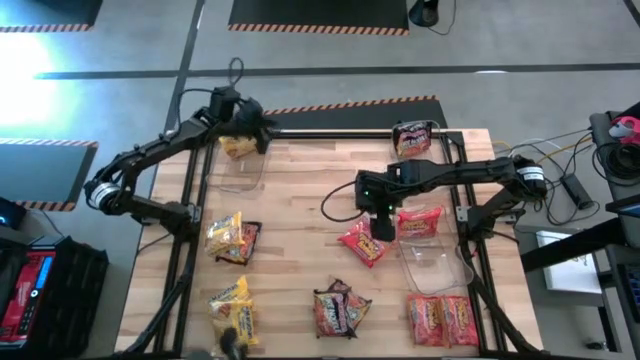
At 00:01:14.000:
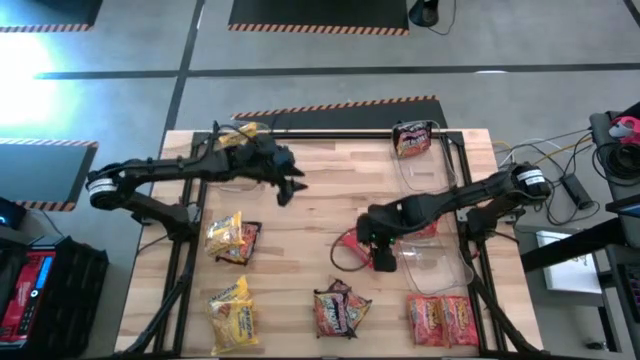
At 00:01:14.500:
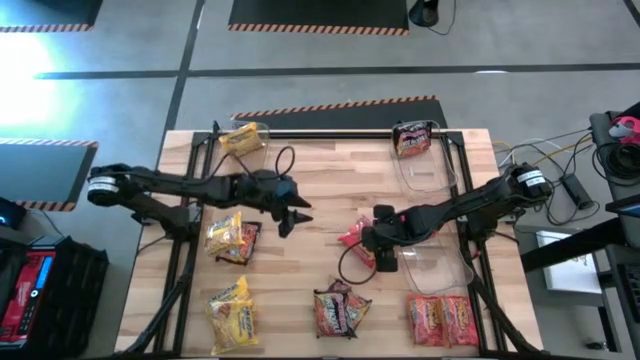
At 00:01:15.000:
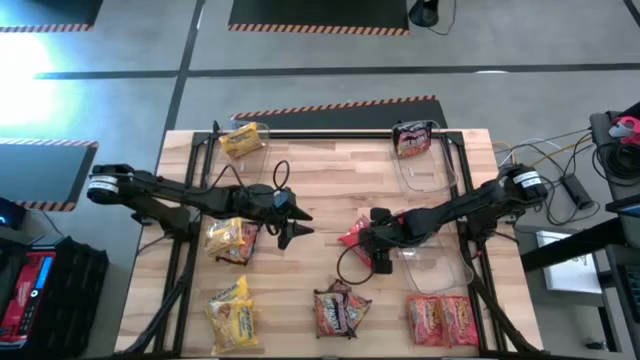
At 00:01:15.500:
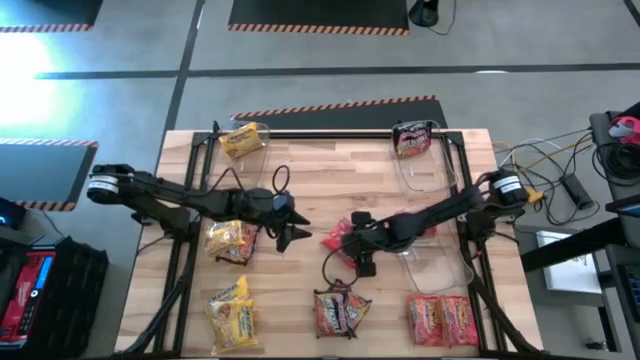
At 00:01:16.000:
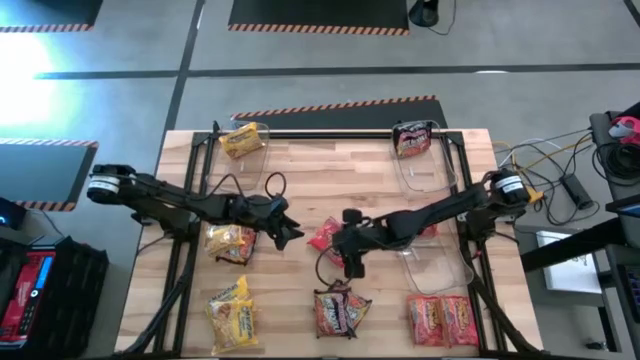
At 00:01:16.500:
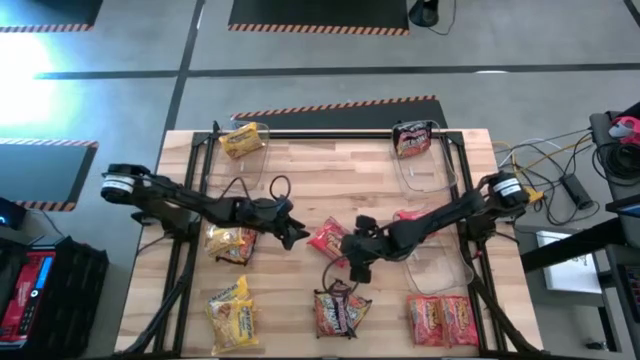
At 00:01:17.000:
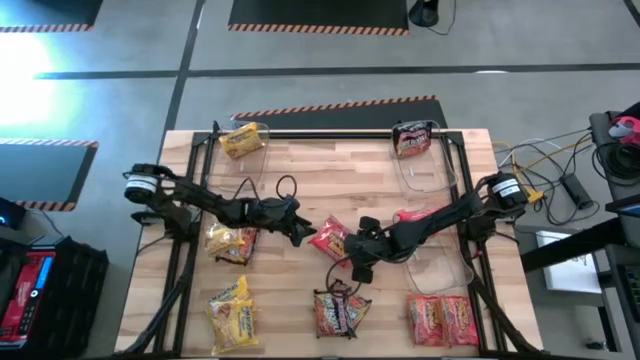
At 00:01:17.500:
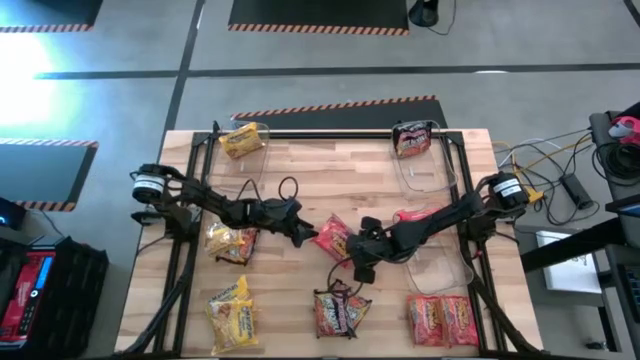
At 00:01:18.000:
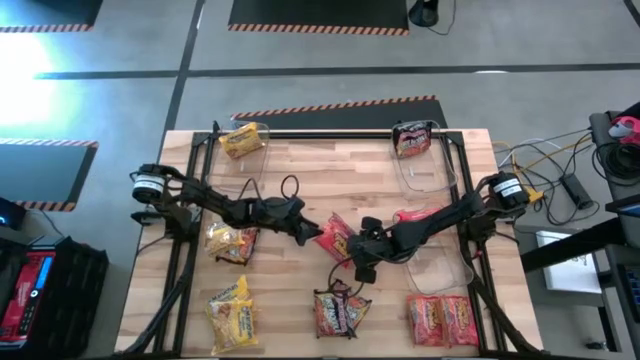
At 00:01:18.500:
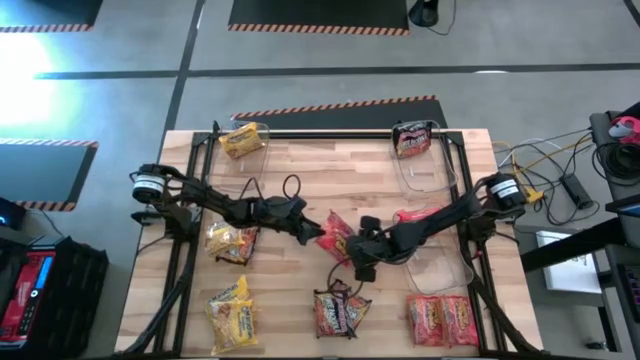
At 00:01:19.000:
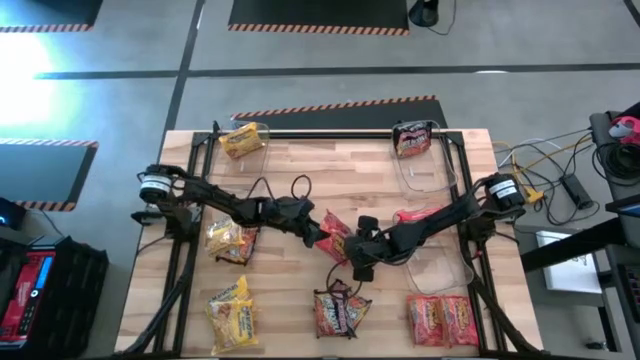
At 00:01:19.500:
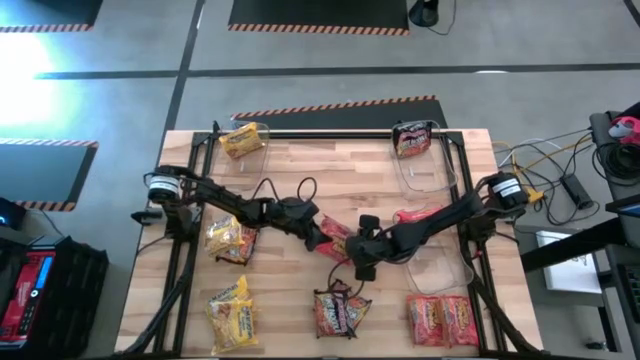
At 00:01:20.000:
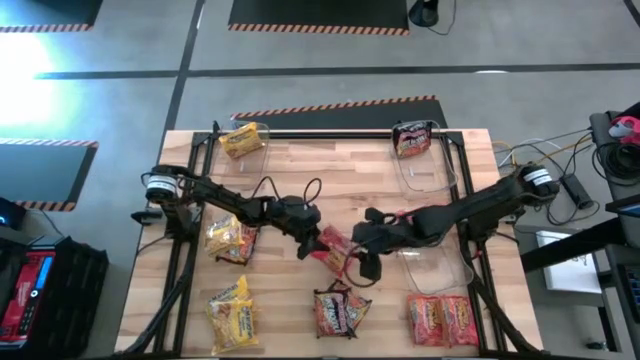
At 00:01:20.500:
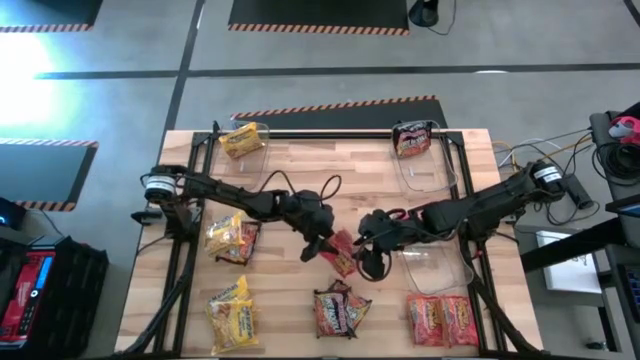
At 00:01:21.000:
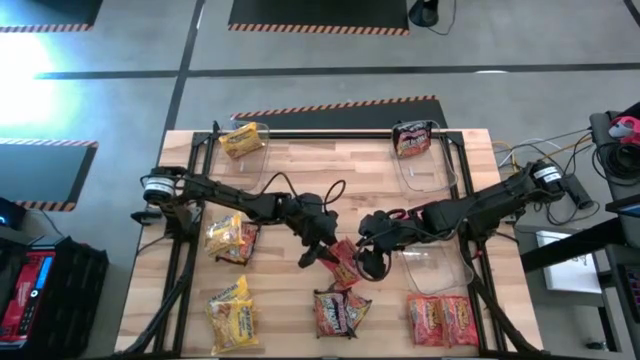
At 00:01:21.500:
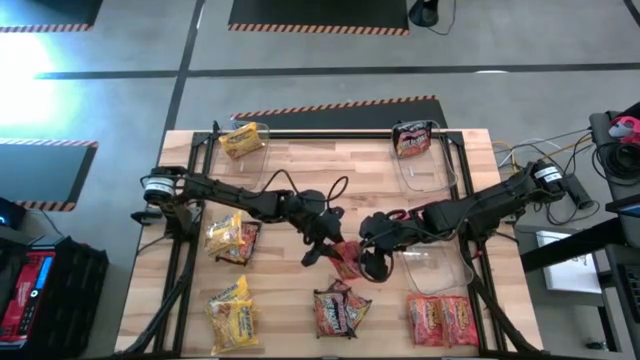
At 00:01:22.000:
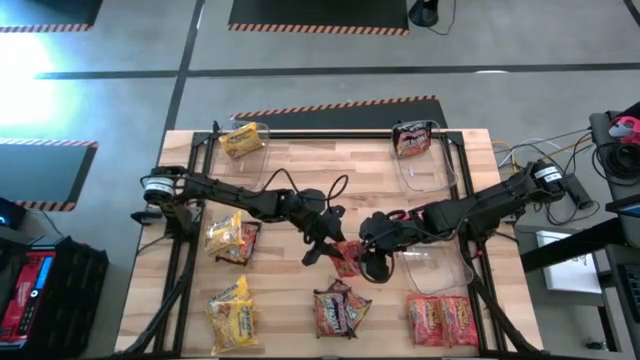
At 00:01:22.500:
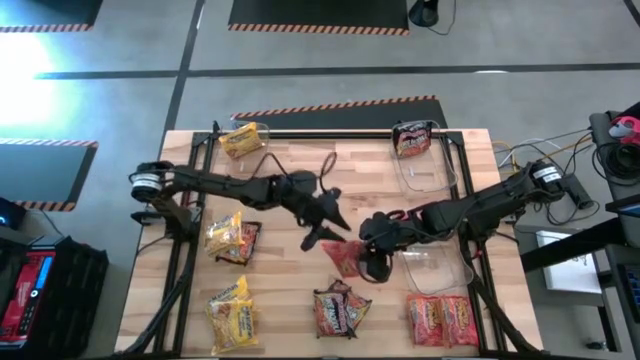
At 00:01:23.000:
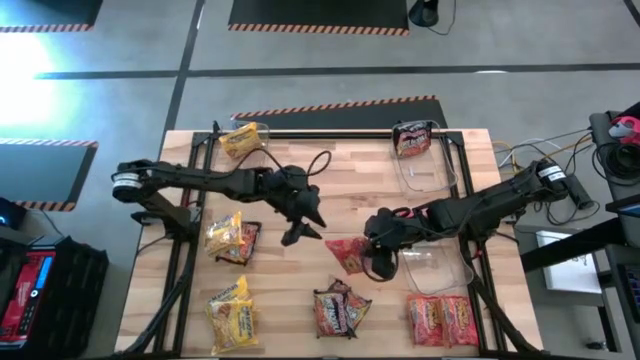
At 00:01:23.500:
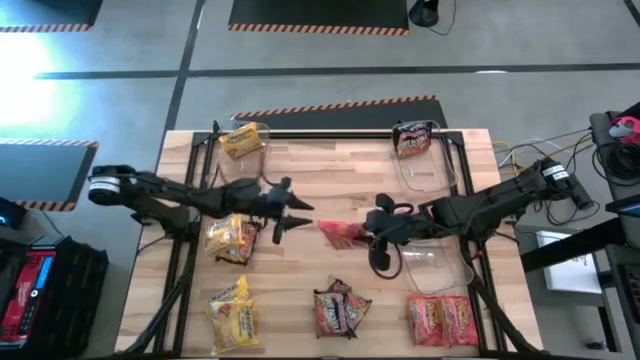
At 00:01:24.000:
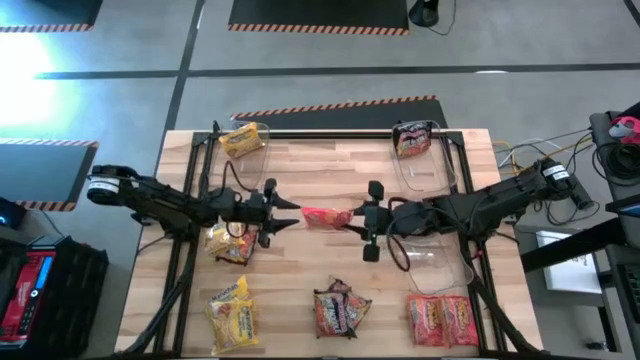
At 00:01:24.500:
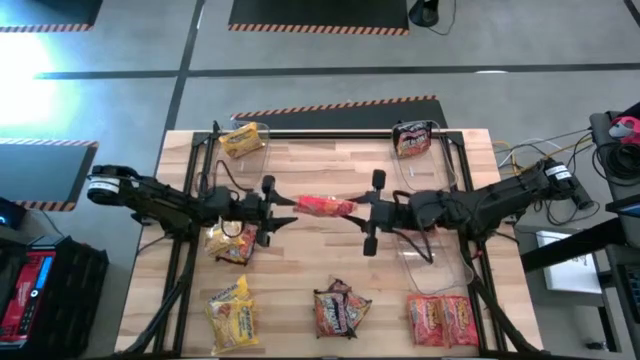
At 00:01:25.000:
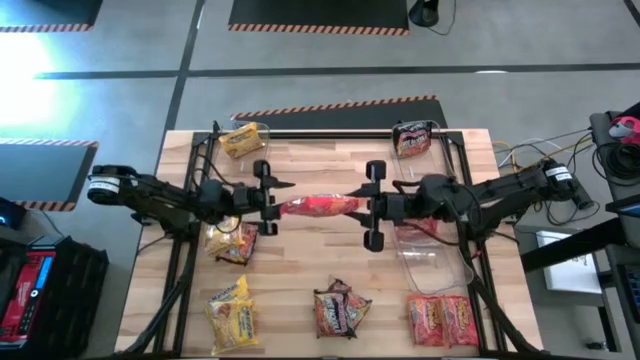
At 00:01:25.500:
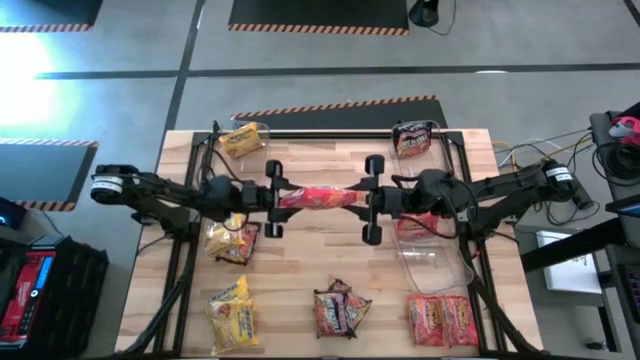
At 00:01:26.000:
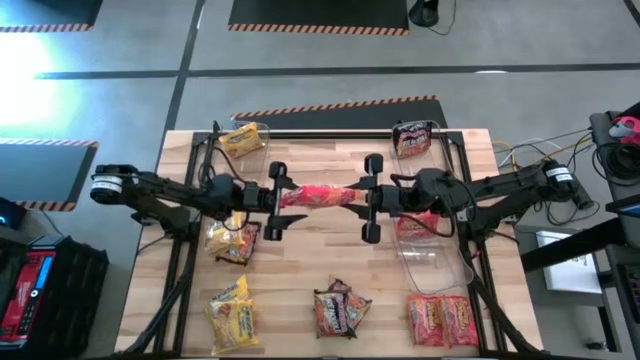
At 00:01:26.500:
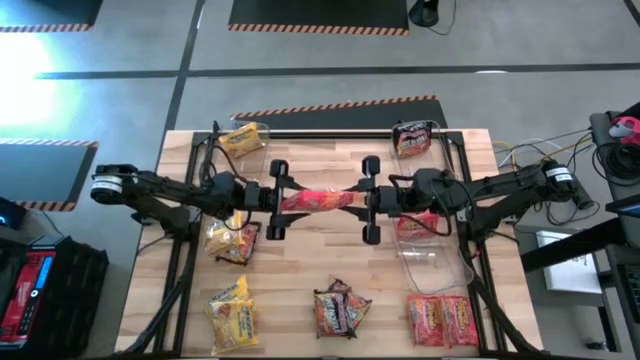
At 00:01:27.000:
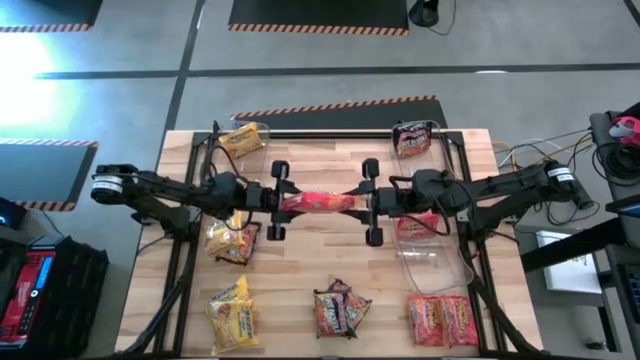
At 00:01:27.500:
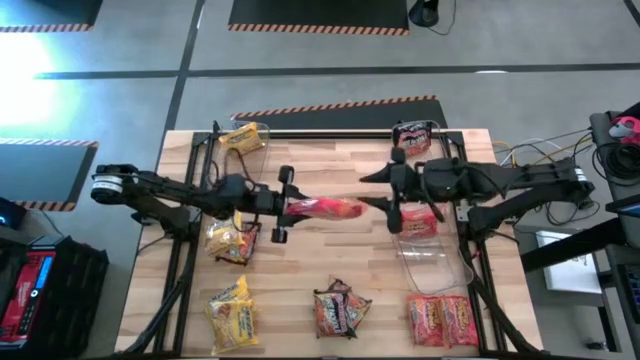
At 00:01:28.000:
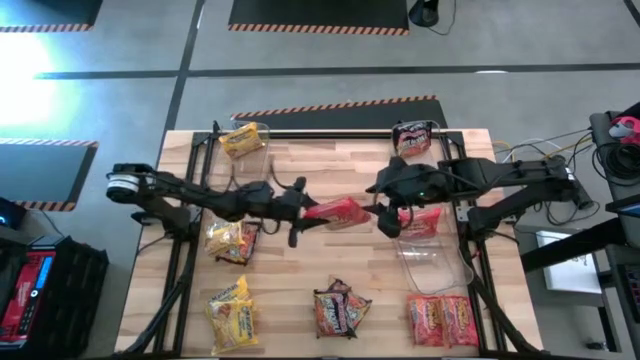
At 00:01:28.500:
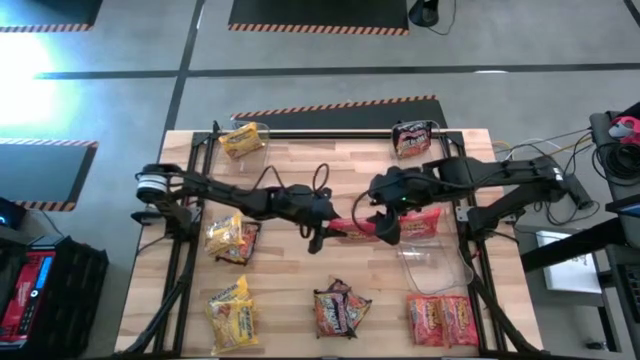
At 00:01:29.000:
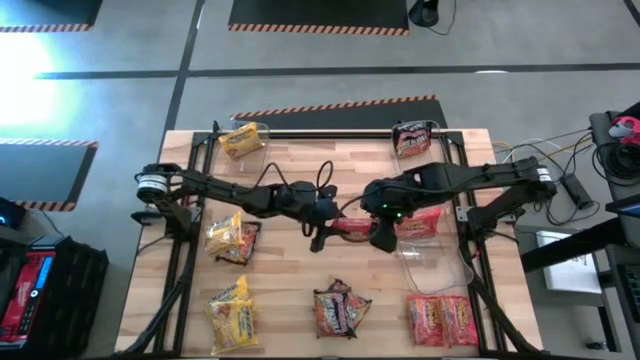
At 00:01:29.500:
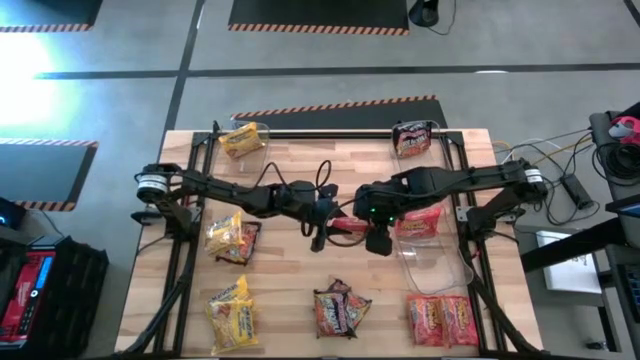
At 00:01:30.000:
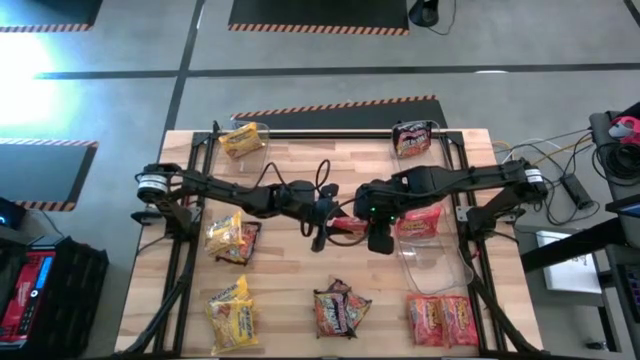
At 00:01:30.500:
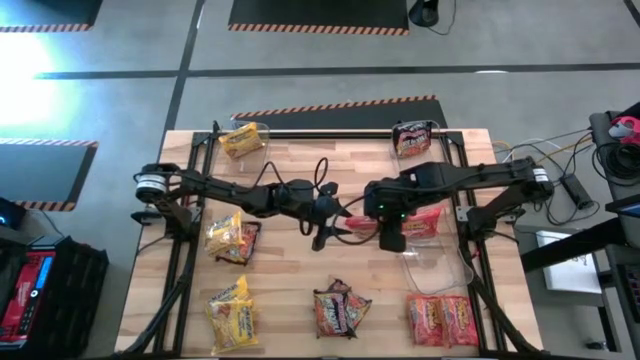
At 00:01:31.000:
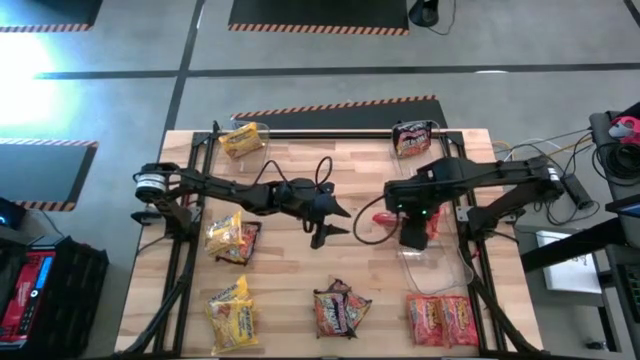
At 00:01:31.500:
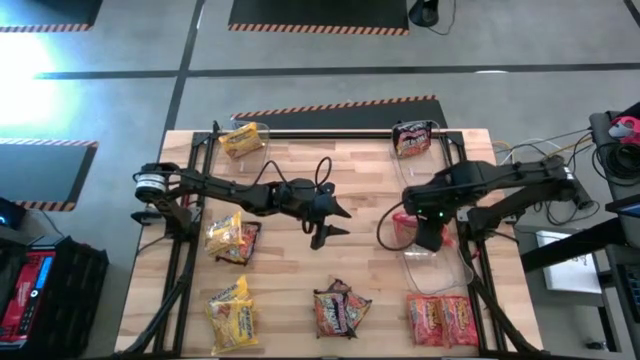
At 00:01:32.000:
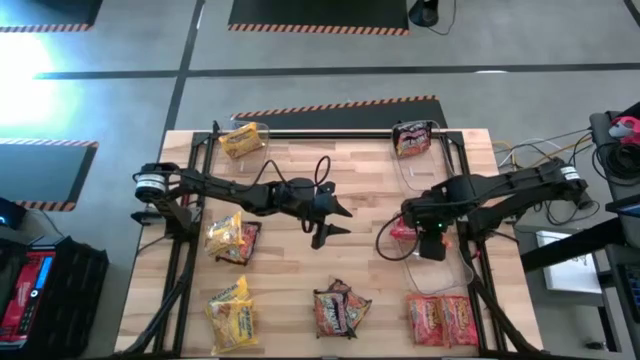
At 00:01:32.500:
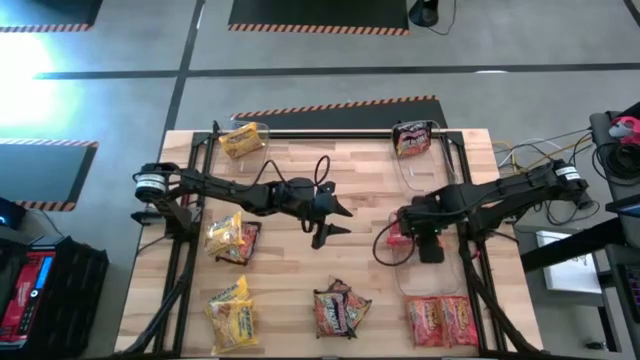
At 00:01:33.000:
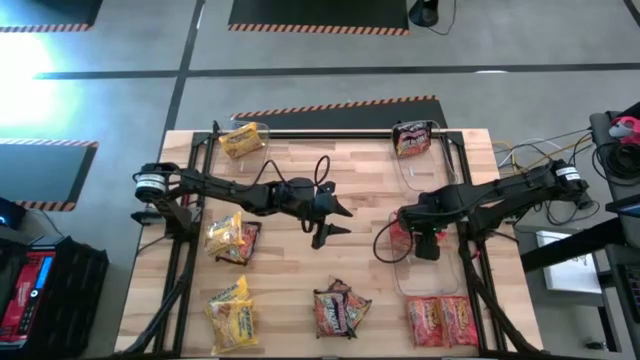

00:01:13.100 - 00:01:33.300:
Task: Sort Maruchan noodles
Put the orange noodle pack into the bottom transparent bin
